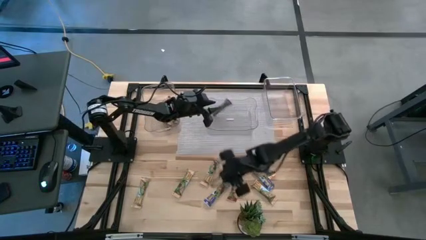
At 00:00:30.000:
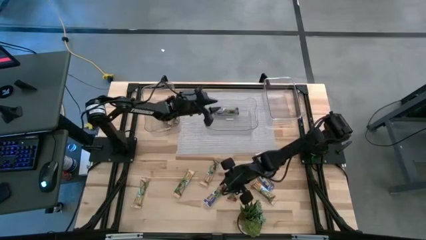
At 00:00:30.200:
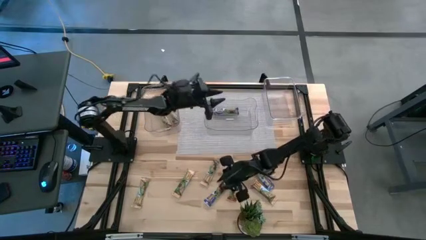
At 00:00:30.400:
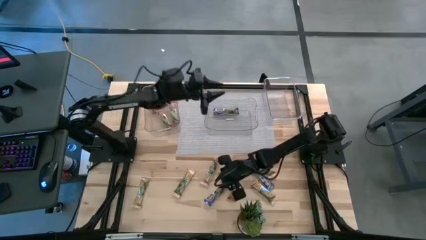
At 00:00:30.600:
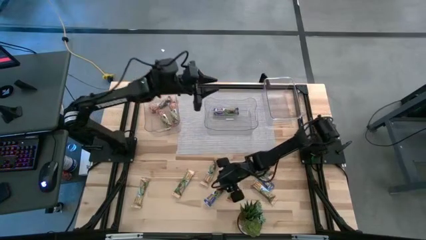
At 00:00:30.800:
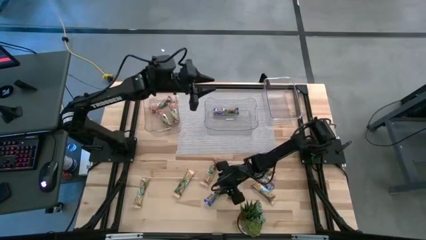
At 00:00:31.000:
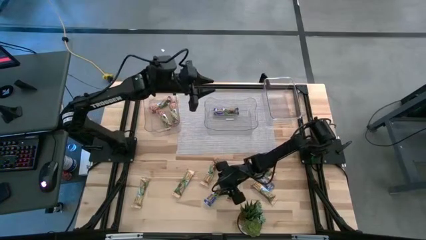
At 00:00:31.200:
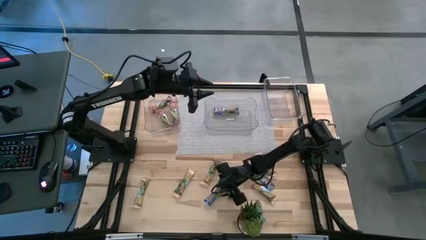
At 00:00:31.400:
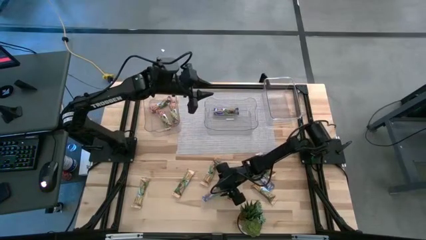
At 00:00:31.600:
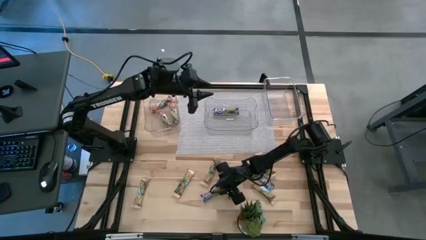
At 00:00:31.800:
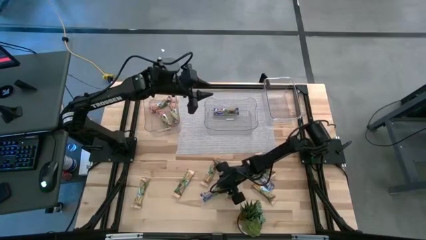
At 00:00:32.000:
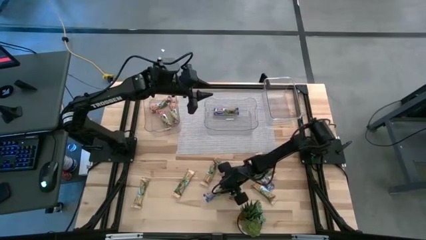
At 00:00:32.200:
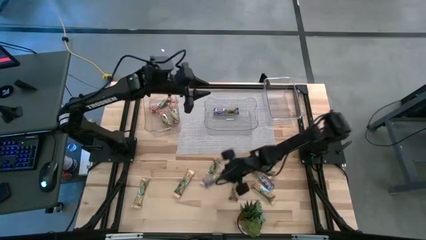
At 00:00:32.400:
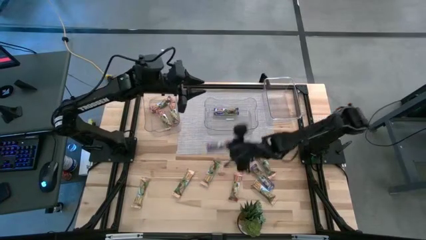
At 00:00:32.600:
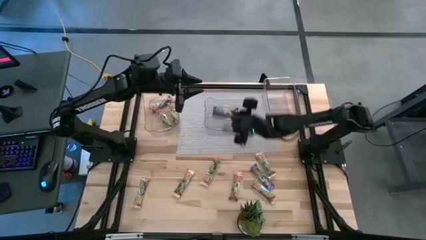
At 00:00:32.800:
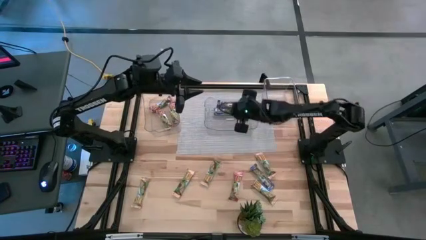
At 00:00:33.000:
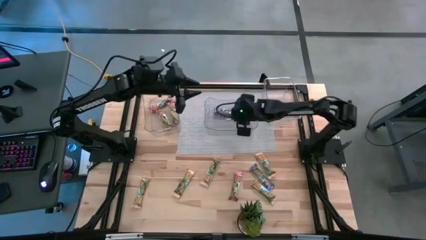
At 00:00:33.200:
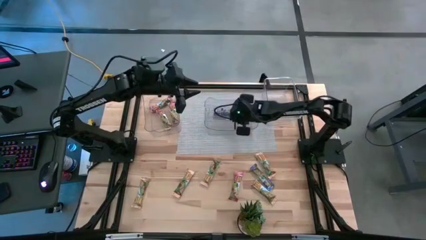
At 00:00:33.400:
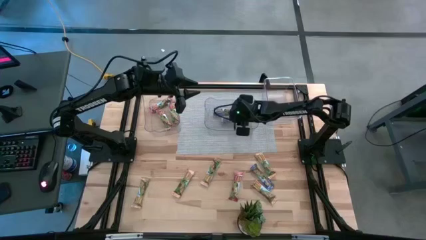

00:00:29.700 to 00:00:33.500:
Task: Pick and place Granola Bars by type
Put the blue granola bar into the middle transparent bin

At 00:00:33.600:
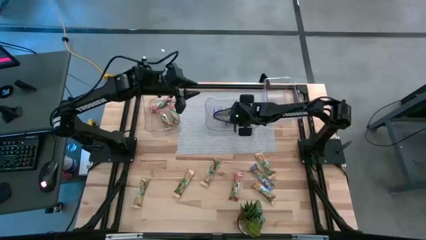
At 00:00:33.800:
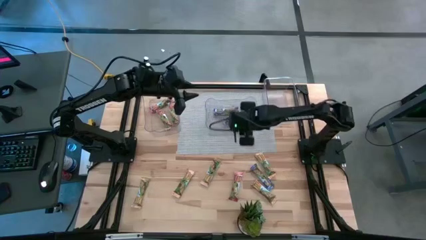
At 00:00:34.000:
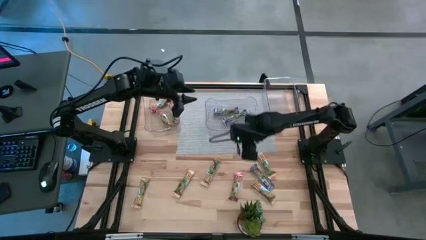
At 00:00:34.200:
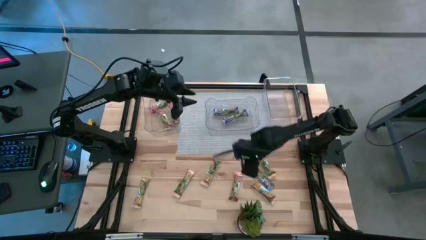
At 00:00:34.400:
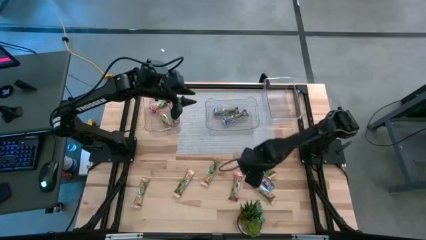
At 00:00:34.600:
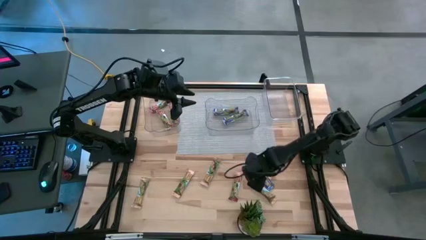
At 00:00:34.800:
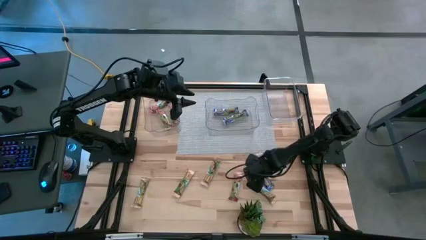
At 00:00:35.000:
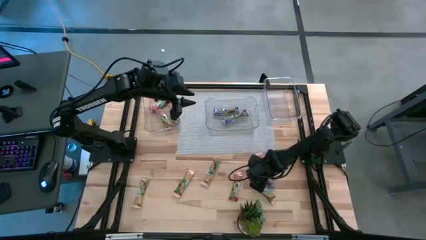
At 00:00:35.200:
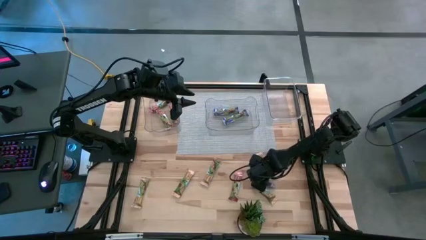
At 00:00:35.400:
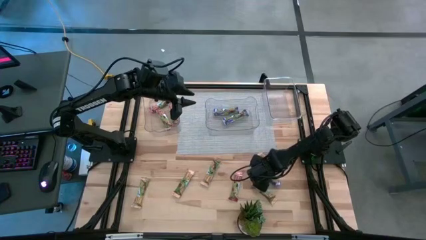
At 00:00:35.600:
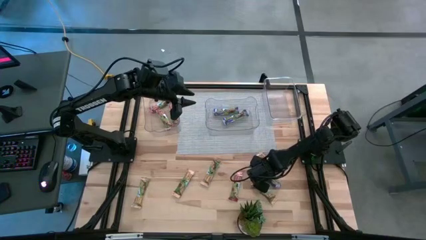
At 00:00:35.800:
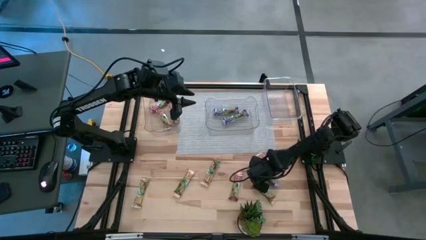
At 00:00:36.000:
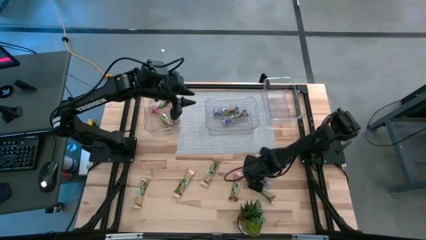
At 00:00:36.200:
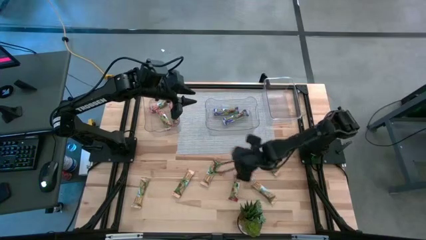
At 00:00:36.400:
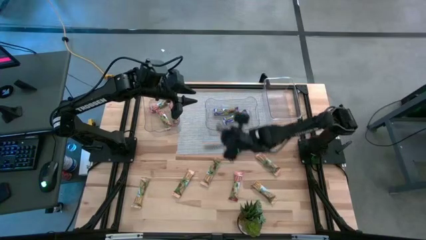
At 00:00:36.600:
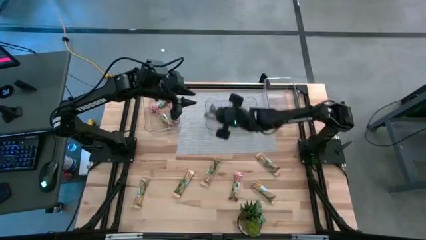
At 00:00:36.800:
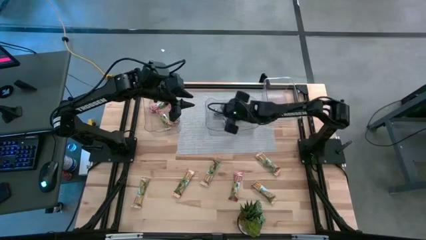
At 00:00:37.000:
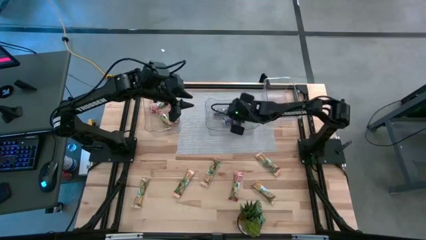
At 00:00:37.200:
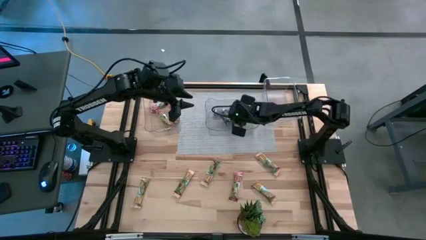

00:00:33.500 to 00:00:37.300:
Put the blue granola bar into the middle transparent bin

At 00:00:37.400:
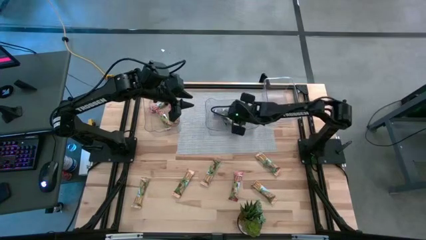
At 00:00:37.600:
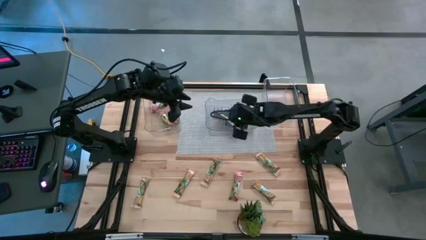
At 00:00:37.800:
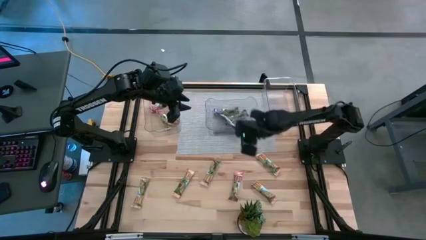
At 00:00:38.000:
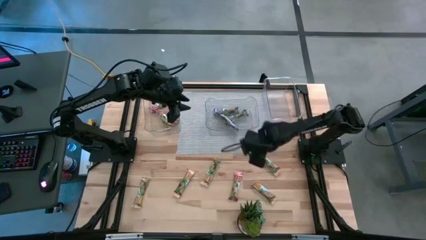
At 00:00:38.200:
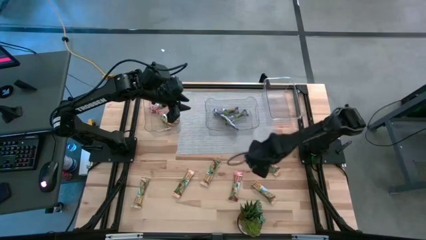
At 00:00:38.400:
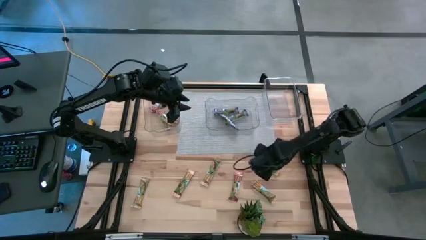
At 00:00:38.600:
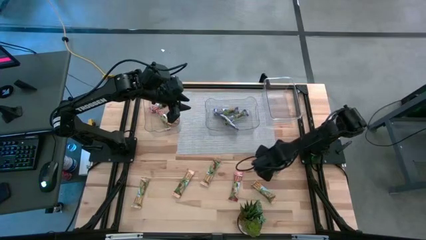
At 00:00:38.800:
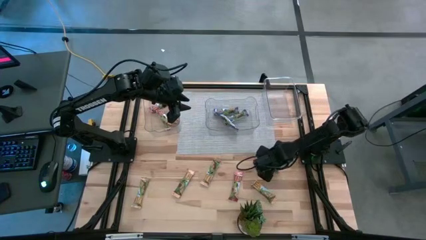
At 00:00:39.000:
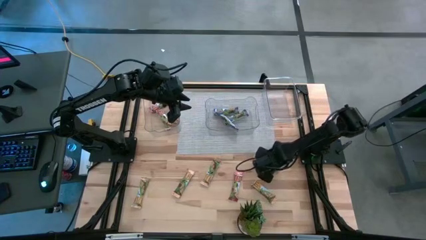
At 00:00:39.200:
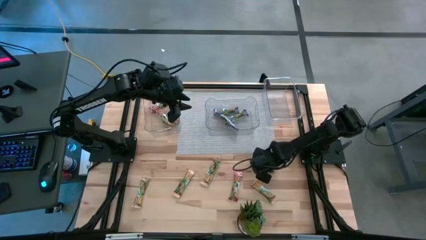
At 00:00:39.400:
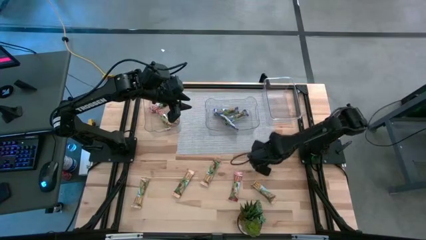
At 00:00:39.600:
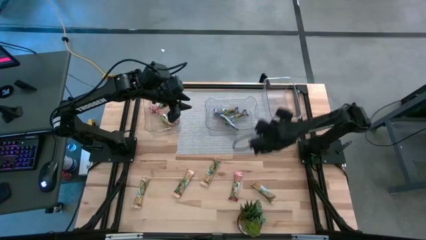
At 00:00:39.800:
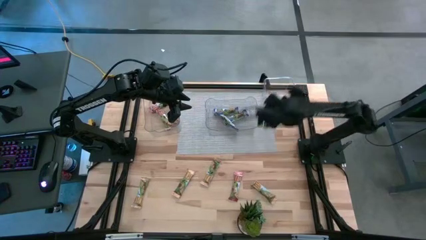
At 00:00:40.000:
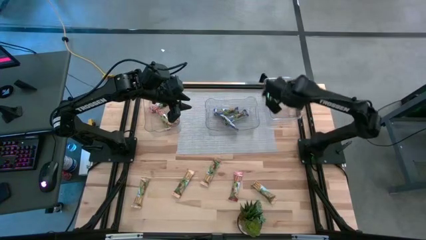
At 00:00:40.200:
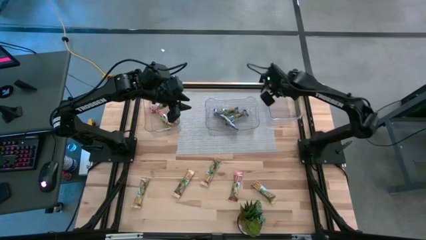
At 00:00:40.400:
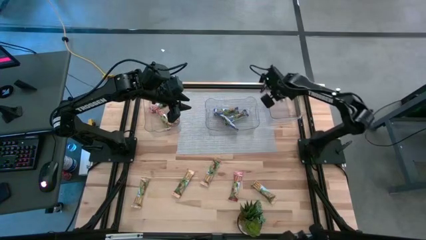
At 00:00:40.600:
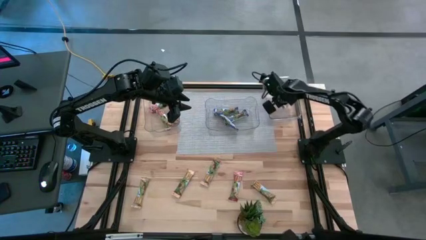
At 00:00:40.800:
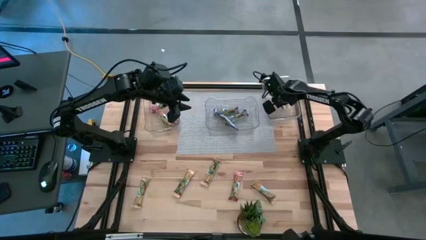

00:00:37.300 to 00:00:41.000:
Put the yellow granola bar into the right transparent bin

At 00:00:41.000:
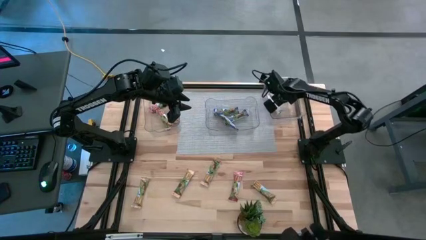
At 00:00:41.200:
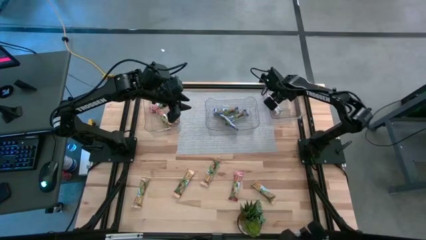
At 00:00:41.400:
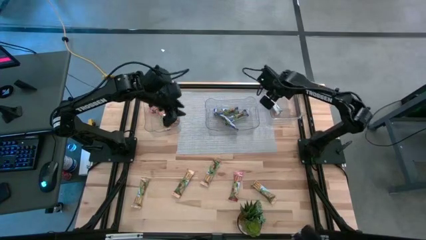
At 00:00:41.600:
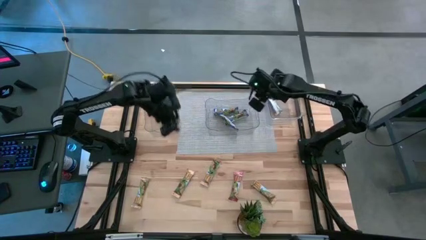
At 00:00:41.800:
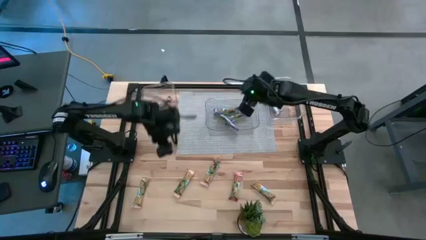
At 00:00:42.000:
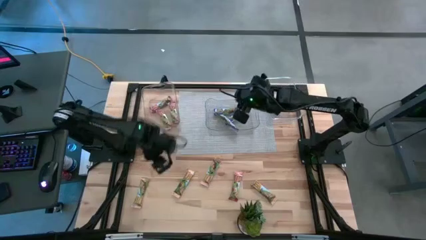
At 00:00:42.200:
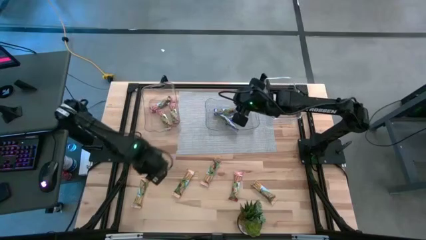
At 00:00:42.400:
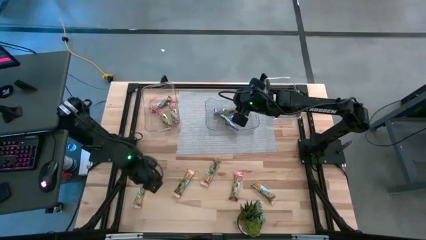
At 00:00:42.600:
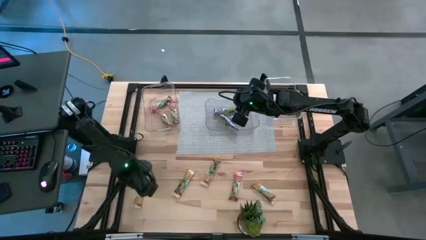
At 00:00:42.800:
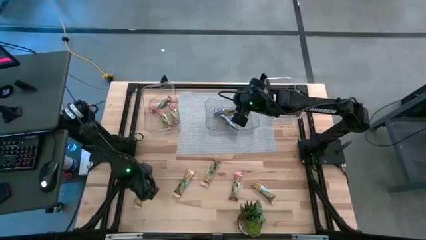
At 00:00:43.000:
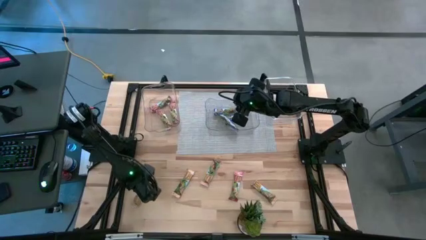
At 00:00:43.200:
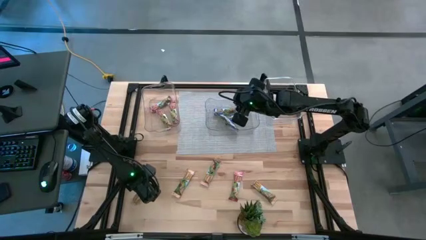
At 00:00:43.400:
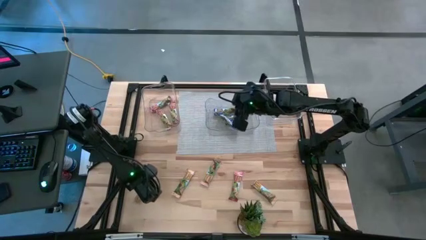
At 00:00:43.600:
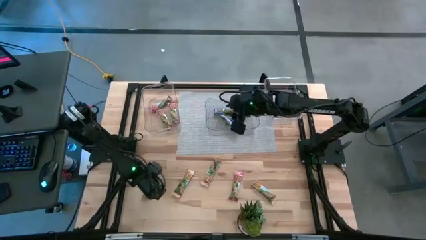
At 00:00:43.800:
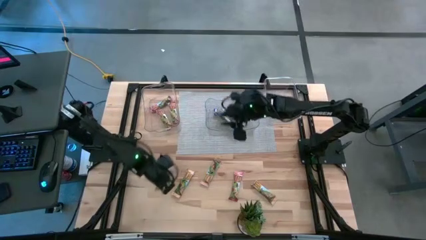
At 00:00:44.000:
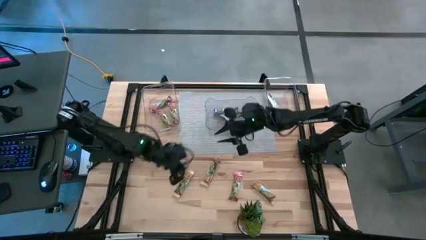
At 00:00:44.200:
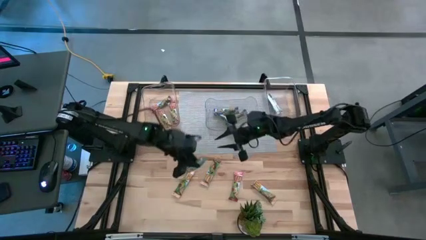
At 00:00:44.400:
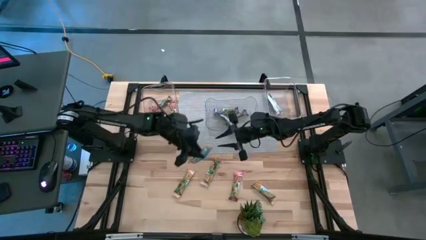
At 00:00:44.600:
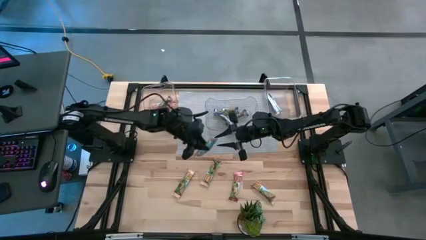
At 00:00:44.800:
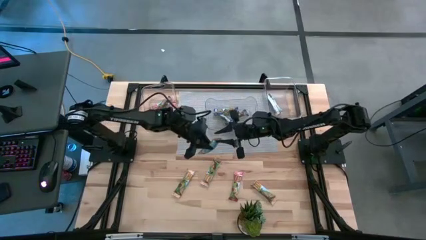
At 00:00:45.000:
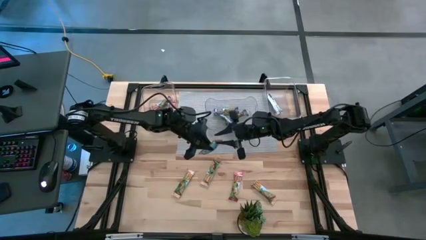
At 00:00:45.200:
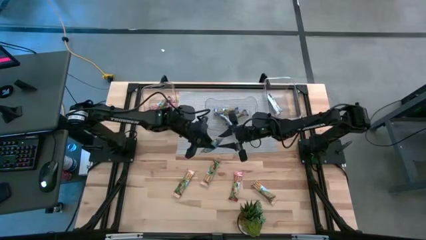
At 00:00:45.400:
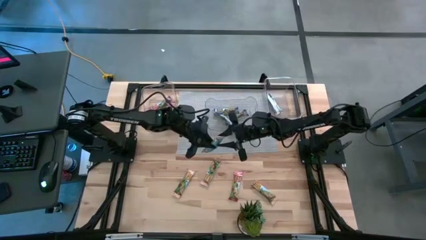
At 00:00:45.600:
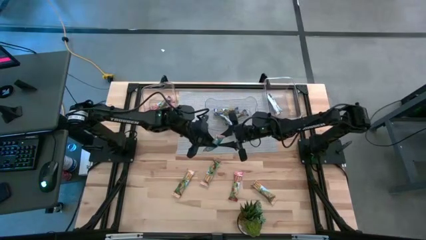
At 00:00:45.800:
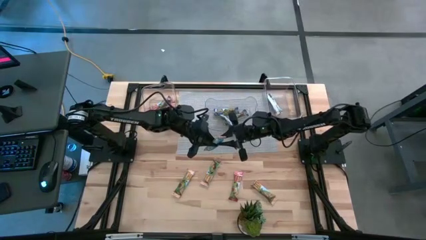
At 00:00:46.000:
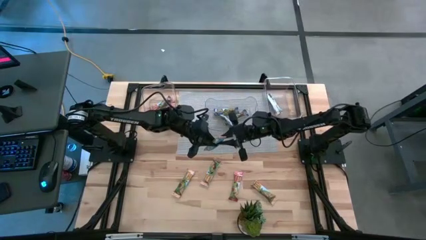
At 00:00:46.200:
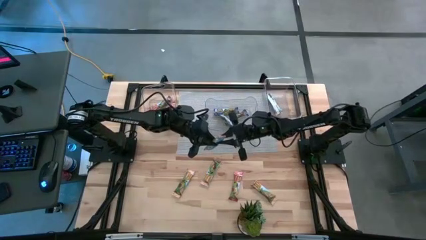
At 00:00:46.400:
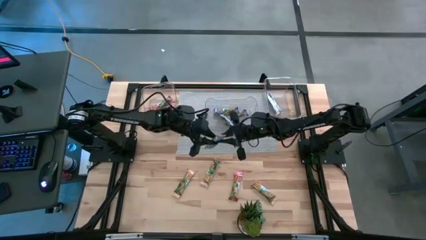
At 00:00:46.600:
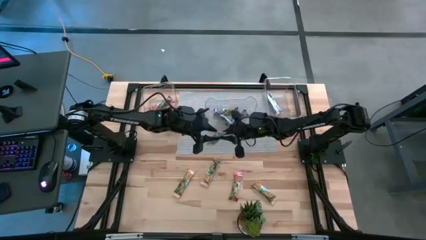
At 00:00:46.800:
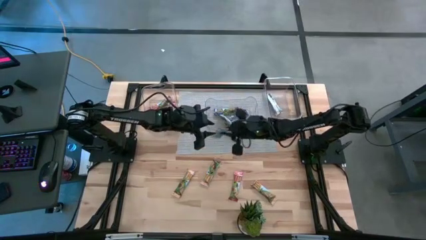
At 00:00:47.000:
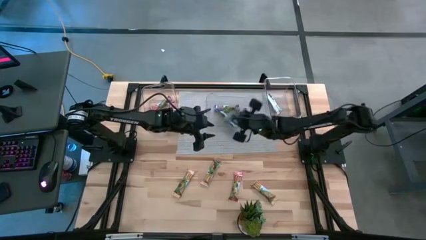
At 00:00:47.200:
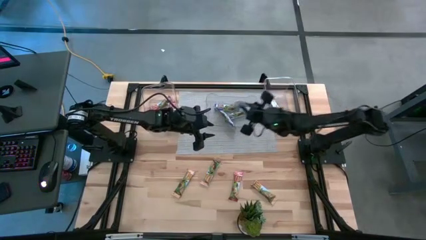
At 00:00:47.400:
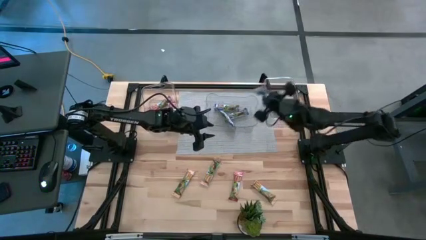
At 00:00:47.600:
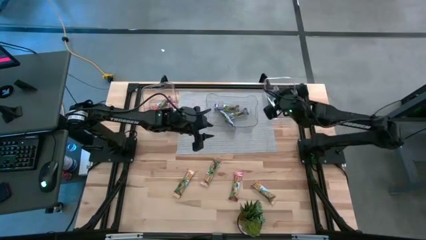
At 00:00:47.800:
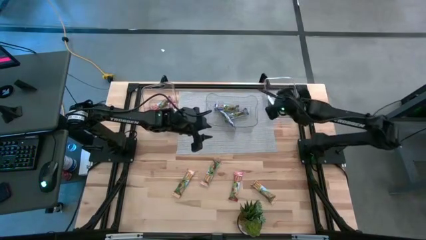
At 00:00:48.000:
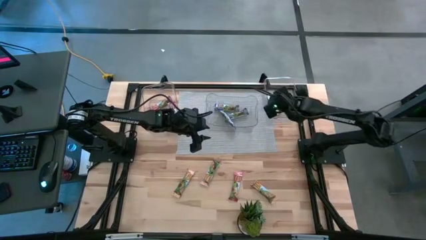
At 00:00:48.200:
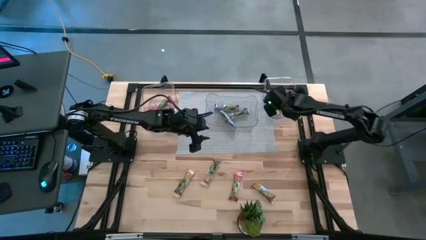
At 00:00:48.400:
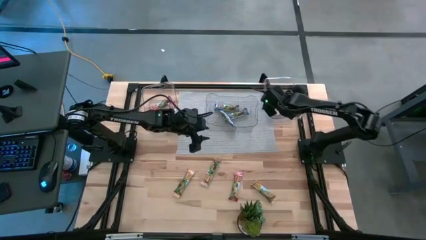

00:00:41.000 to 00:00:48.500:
Put the yellow granola bar into the right transparent bin
